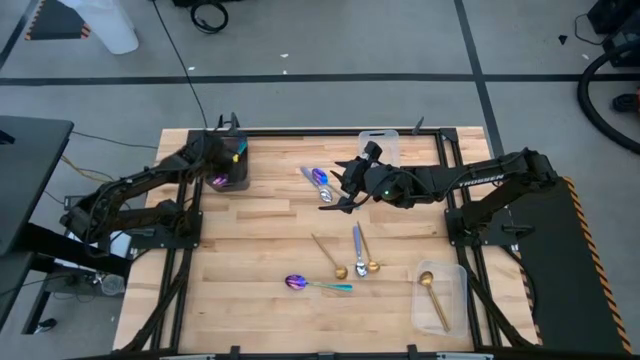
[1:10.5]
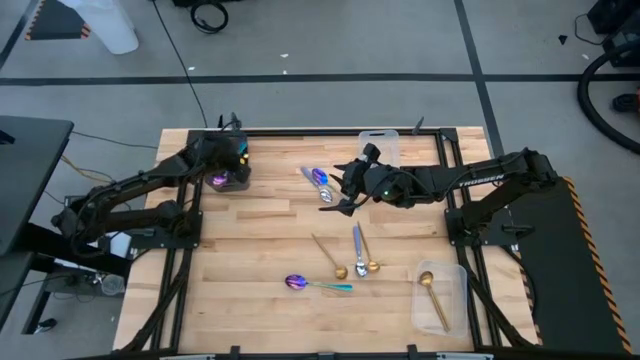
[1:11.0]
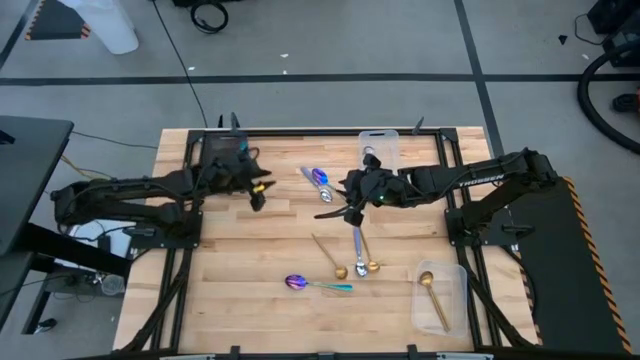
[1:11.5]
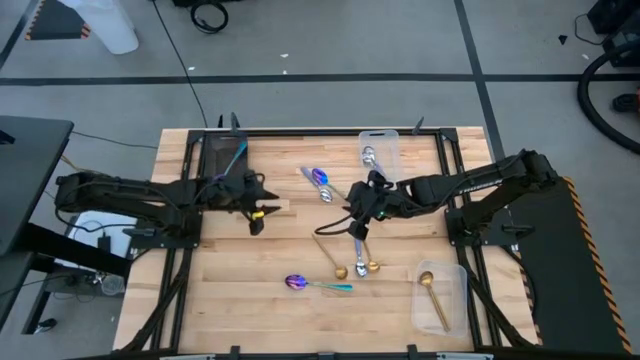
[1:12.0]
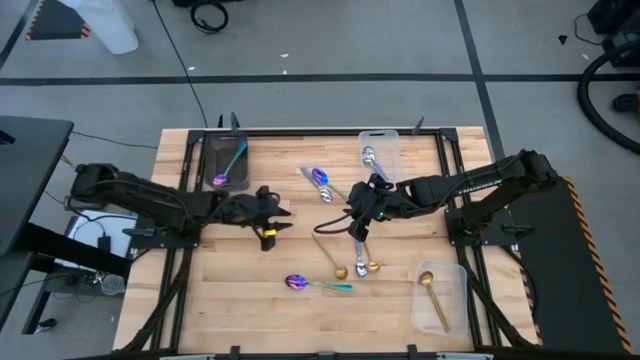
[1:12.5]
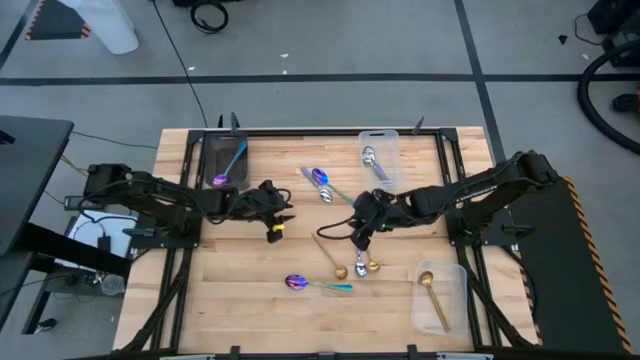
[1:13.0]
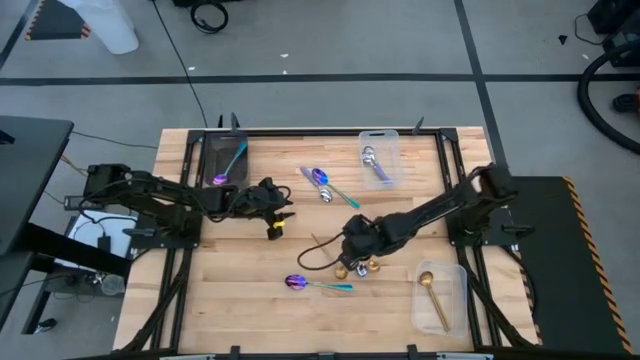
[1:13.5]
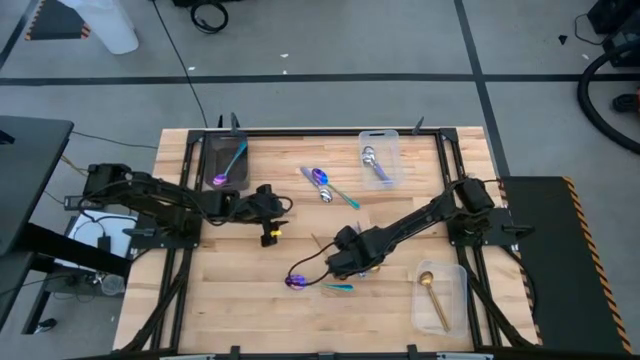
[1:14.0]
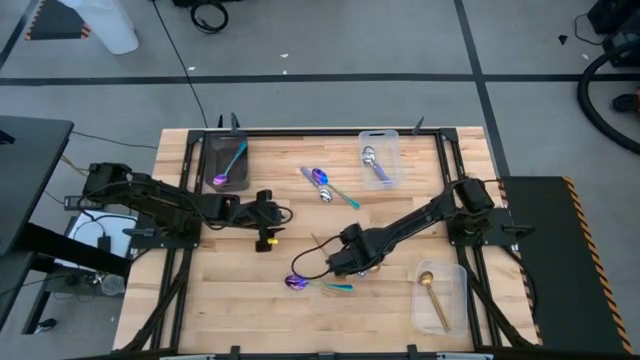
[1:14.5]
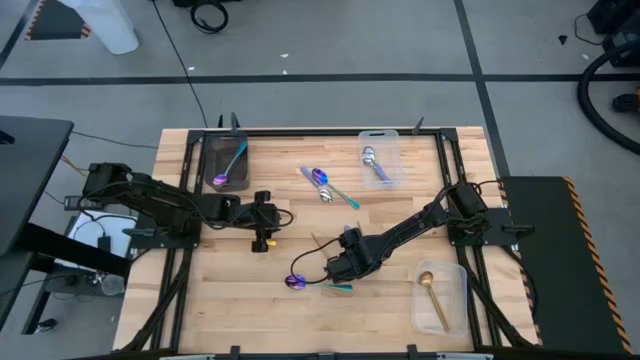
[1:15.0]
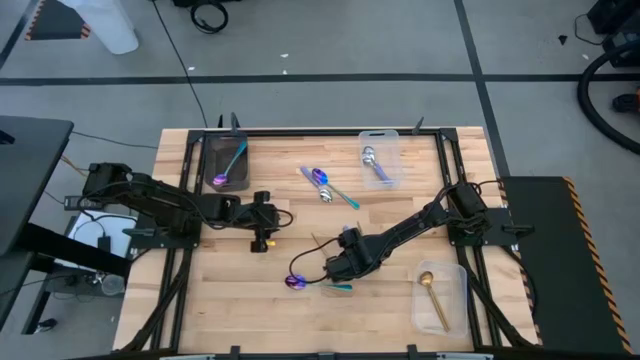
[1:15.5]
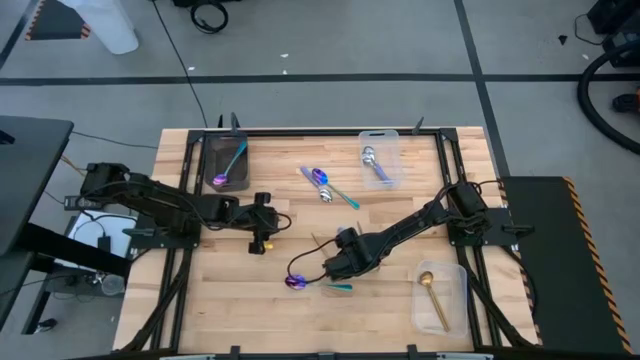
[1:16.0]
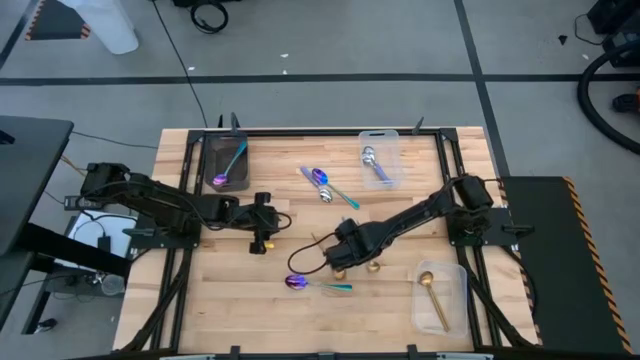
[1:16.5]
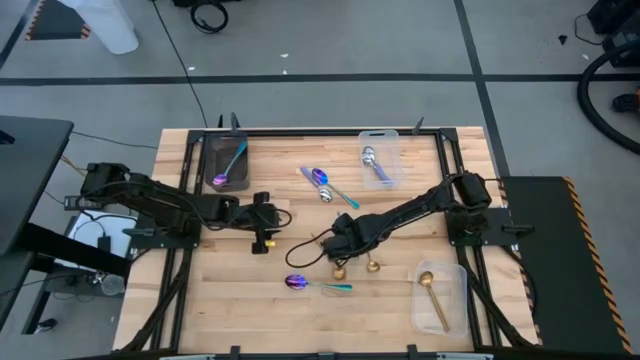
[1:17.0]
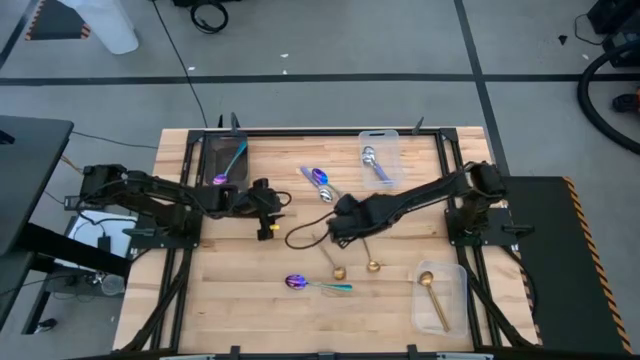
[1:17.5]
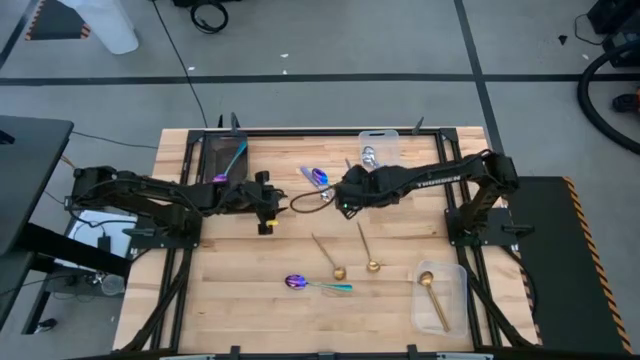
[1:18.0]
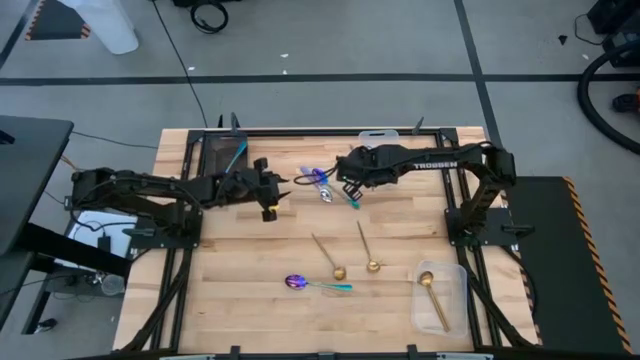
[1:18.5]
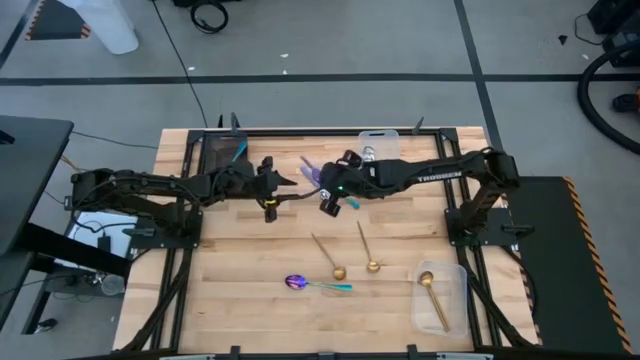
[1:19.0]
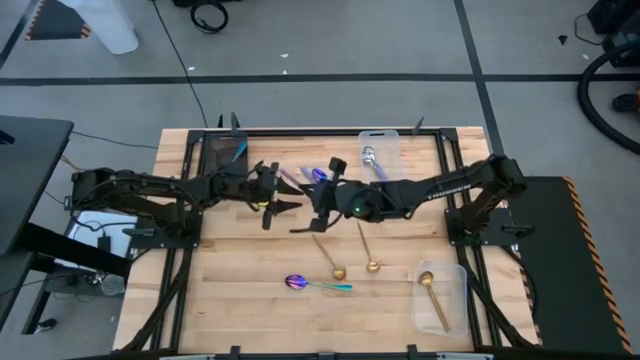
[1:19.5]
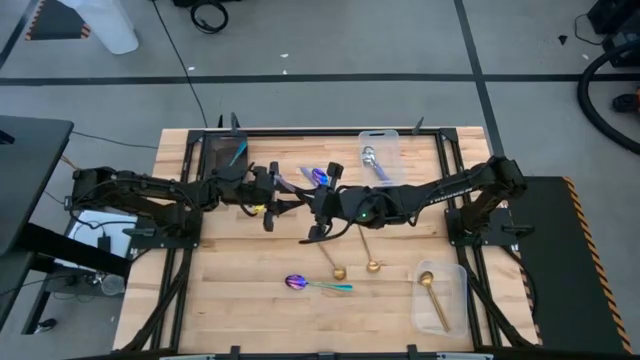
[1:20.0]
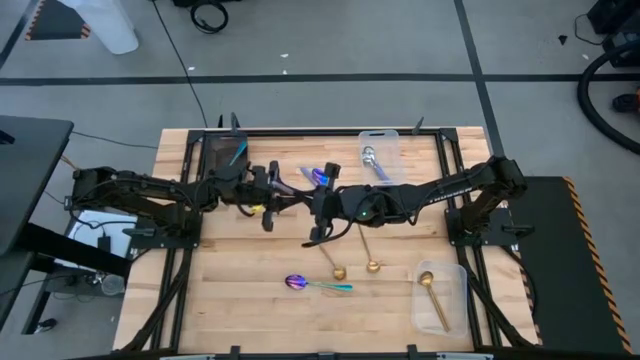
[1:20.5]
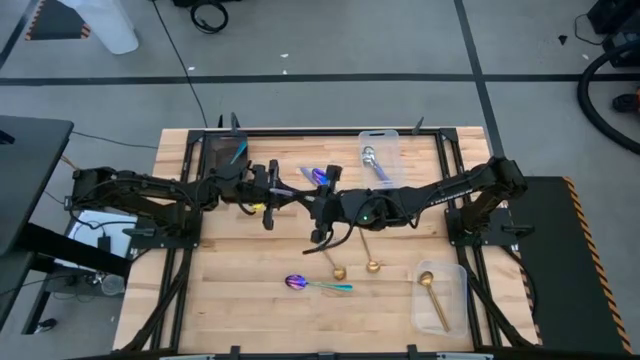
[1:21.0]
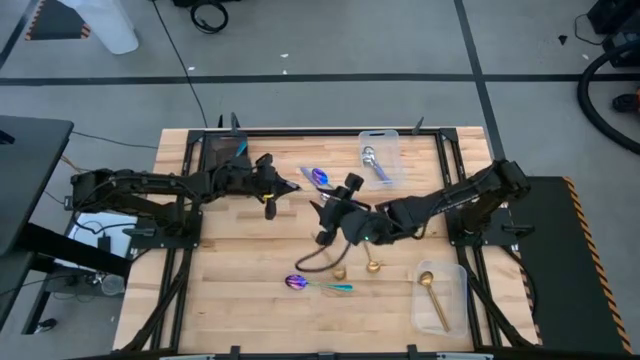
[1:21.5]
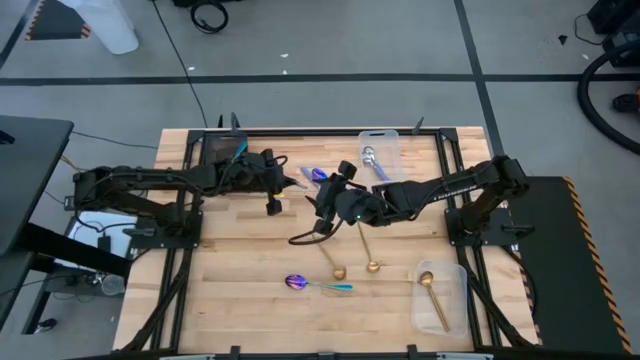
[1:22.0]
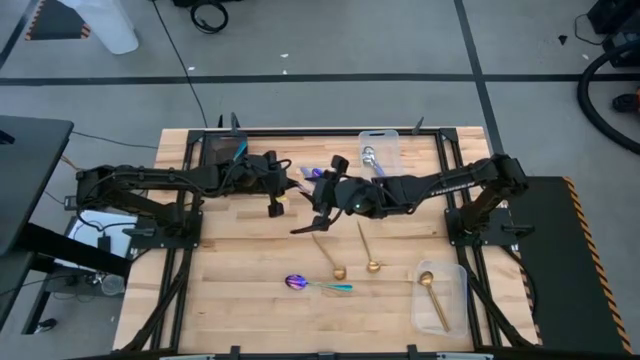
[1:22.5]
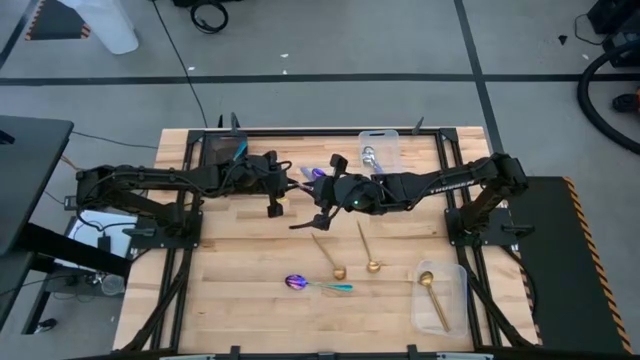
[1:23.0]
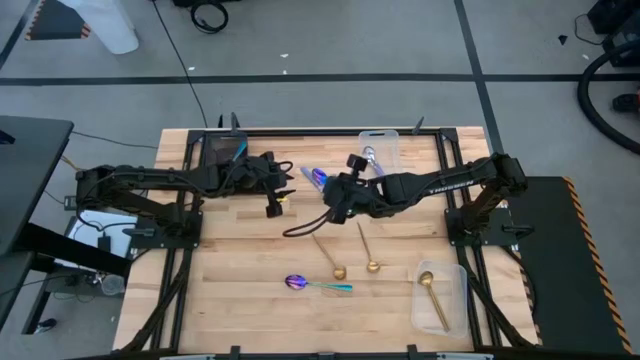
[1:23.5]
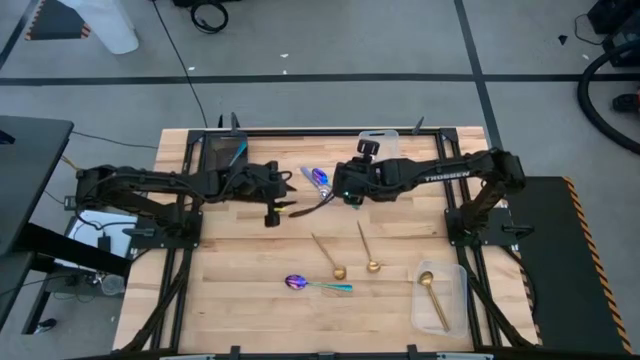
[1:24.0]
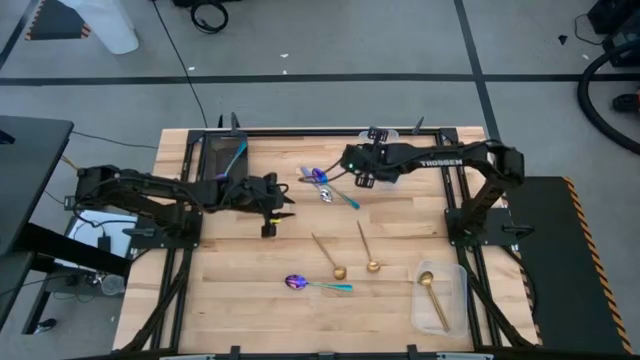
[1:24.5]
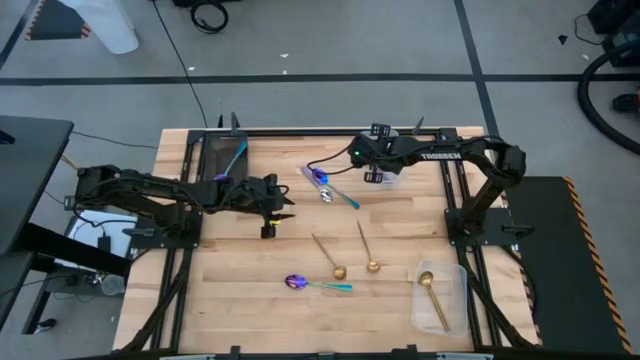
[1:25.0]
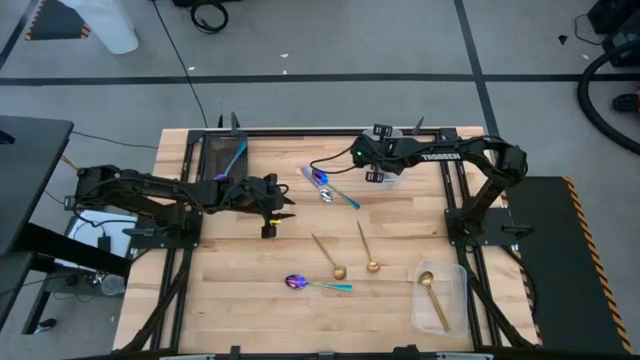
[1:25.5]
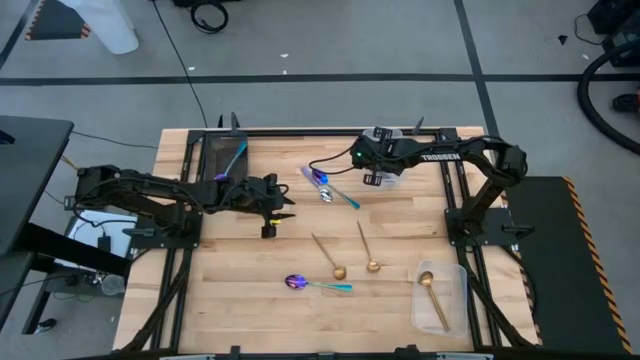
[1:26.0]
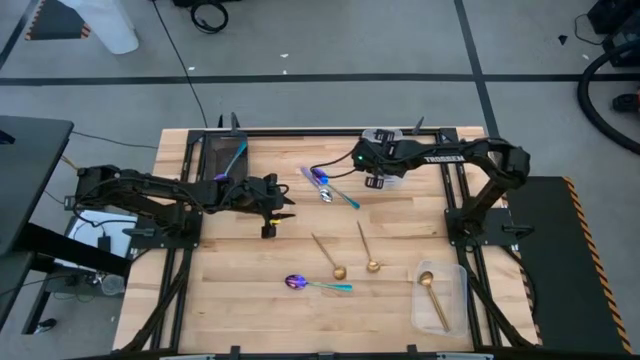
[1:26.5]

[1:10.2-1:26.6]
Task: Sort silverware by color (type)
Put the purple spoon into the top transparent bin

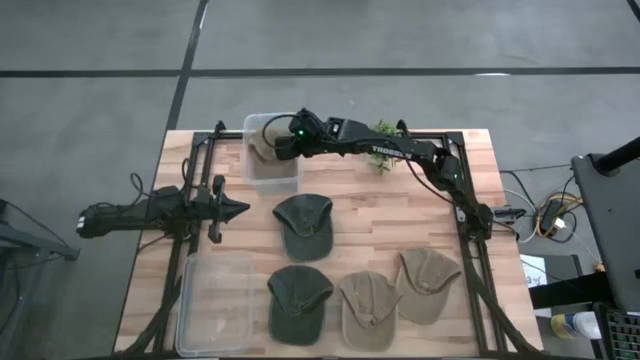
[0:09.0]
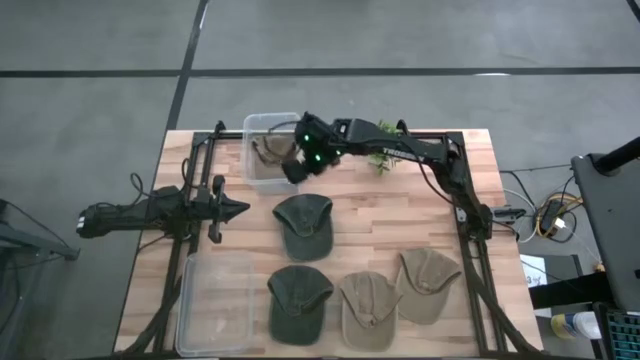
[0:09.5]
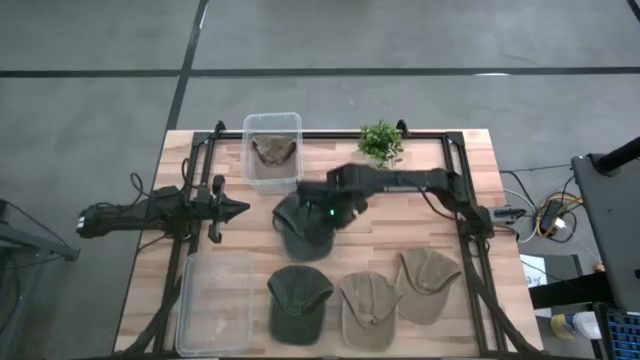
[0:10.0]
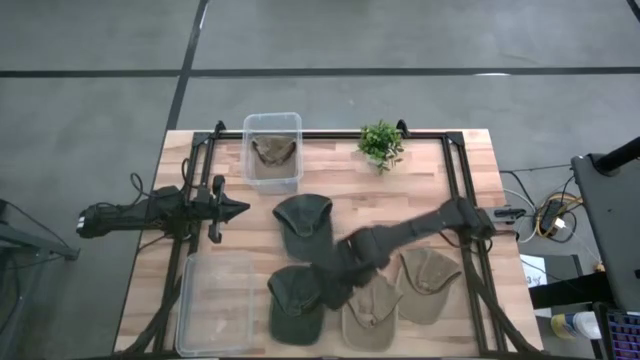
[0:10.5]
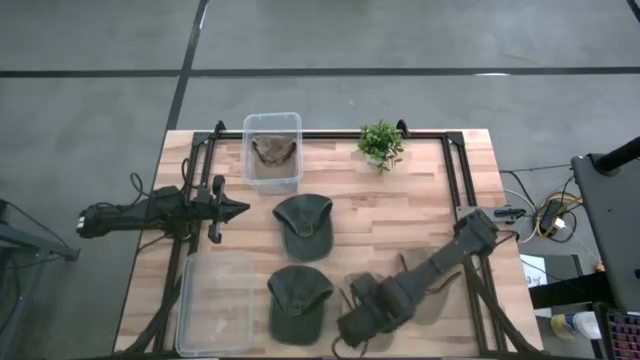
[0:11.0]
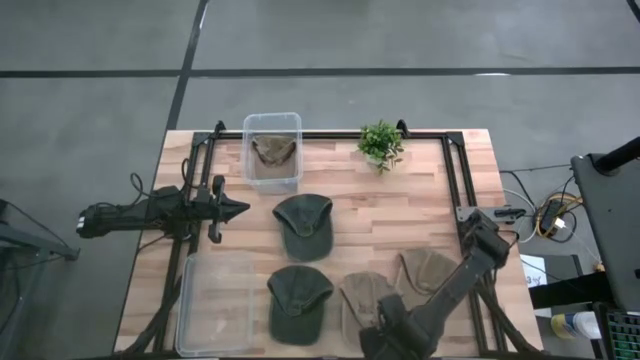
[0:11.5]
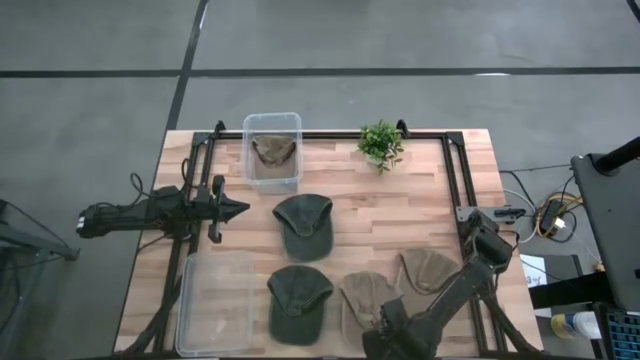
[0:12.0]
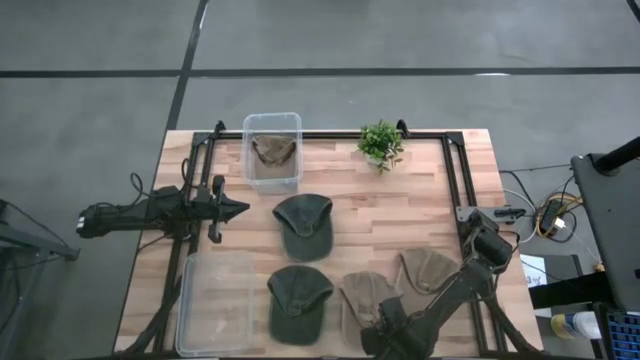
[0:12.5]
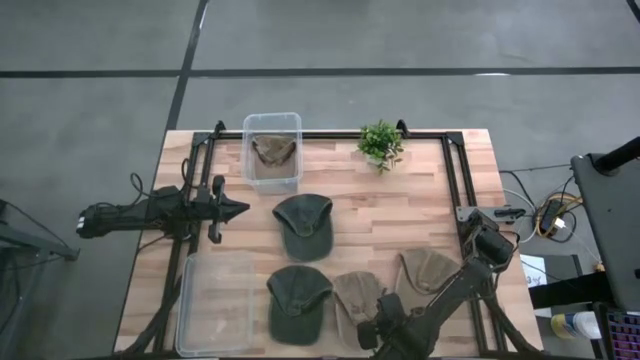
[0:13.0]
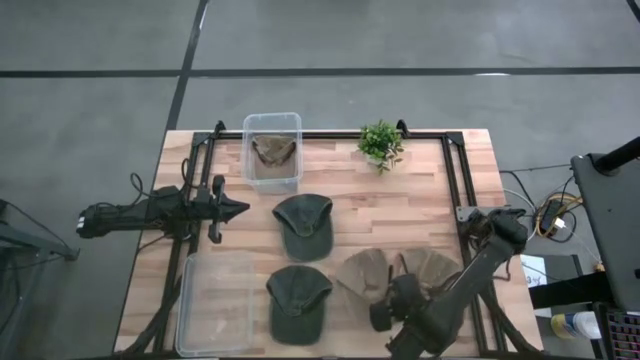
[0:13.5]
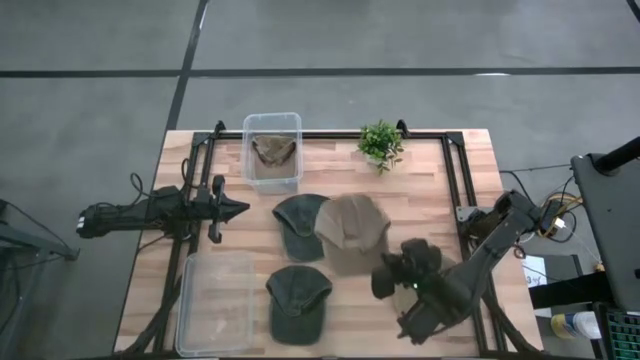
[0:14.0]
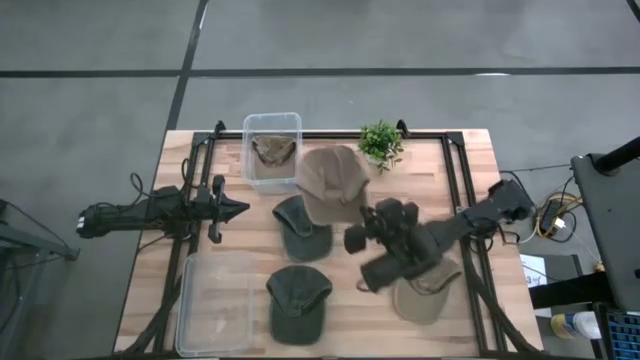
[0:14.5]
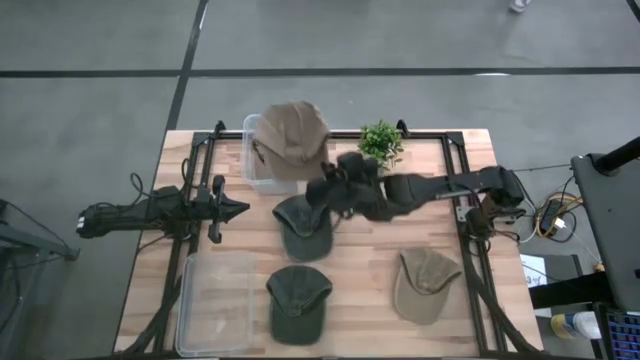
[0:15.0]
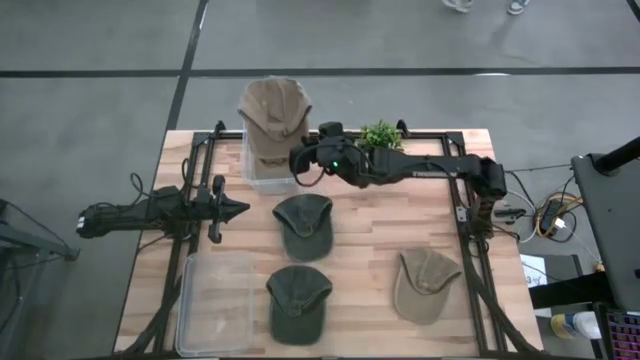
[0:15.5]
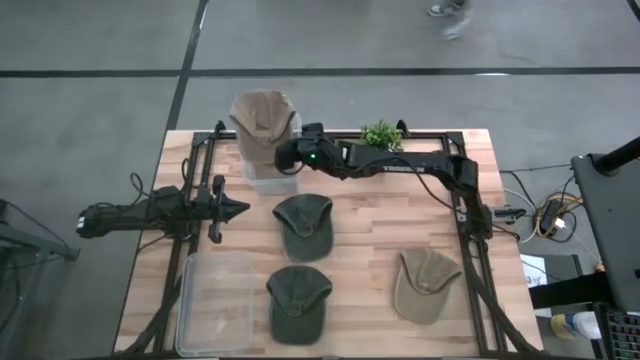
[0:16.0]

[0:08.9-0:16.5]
Task: Pick & Place hat
Put the left brown cap into the top transparent cap
